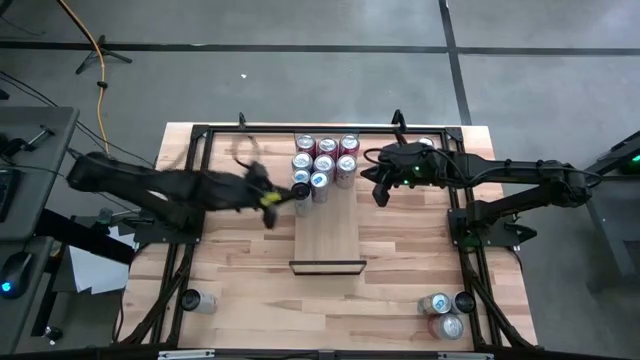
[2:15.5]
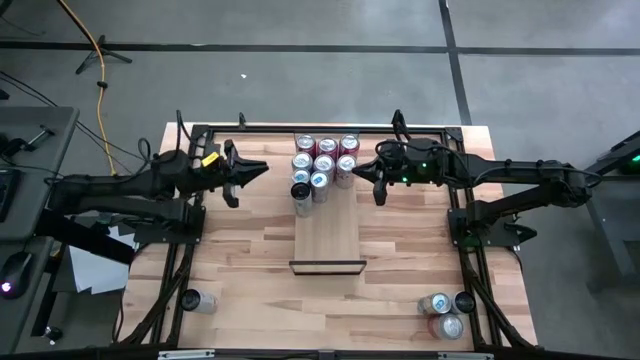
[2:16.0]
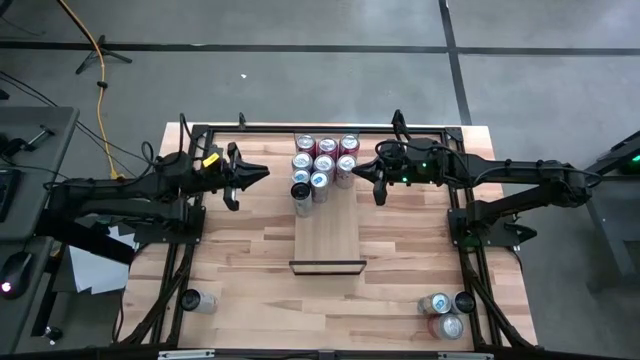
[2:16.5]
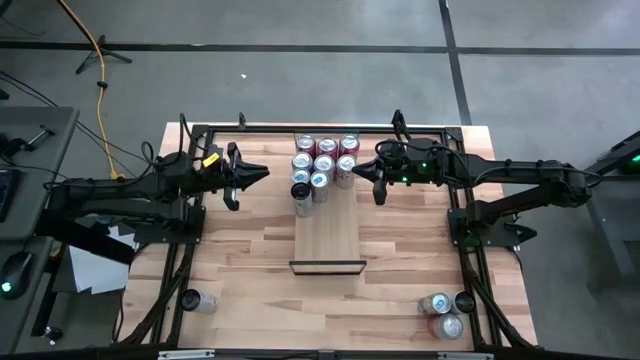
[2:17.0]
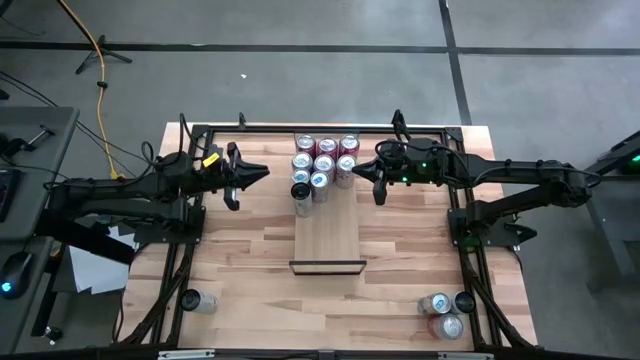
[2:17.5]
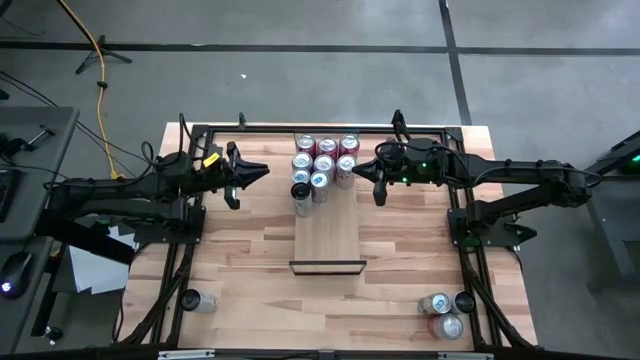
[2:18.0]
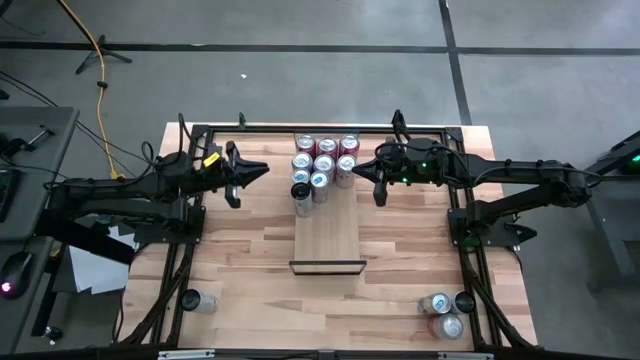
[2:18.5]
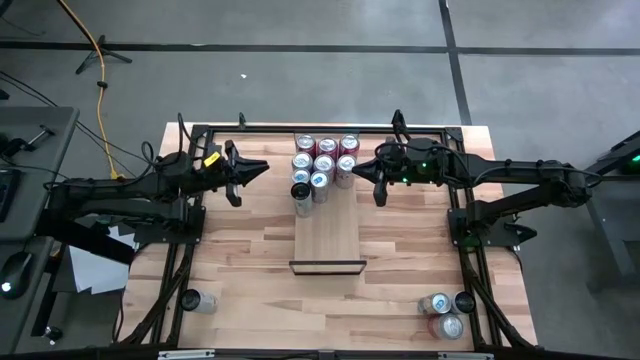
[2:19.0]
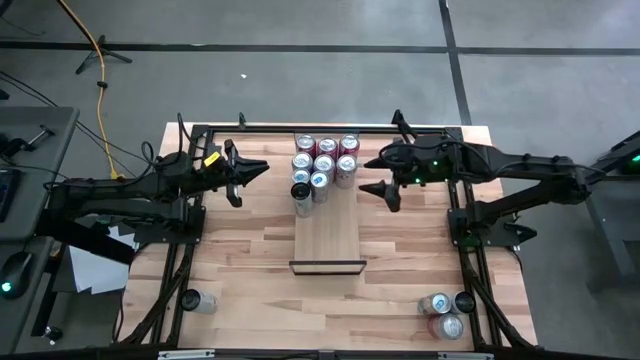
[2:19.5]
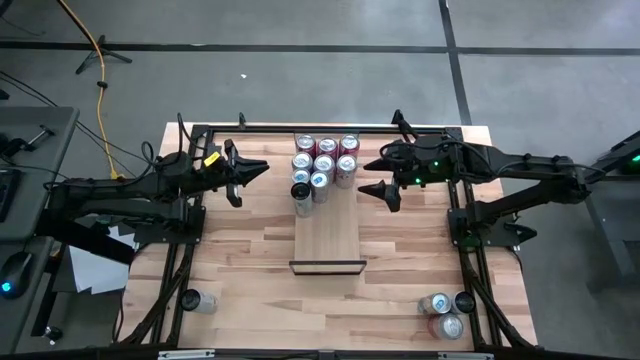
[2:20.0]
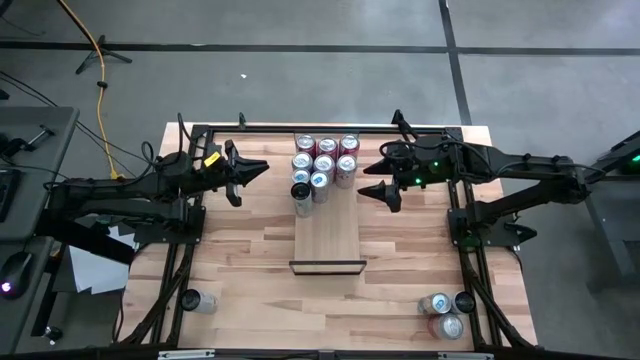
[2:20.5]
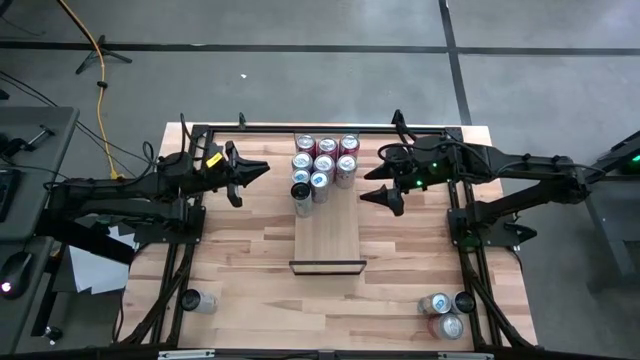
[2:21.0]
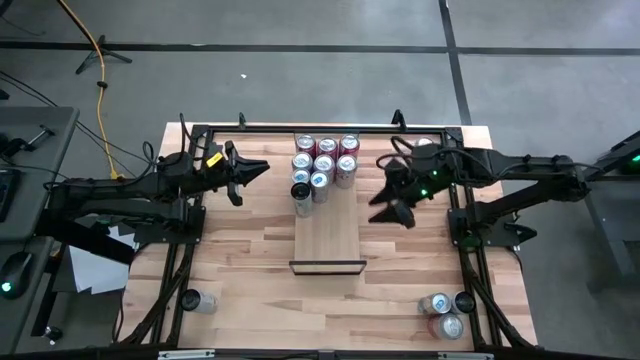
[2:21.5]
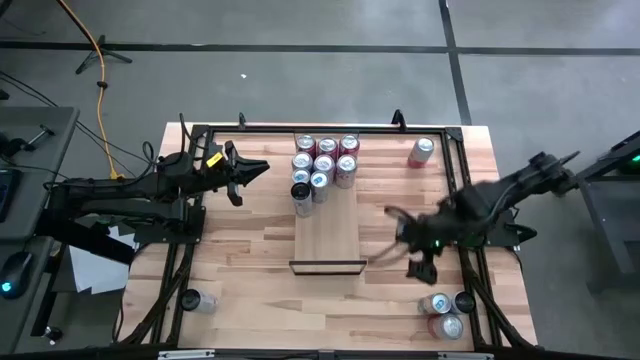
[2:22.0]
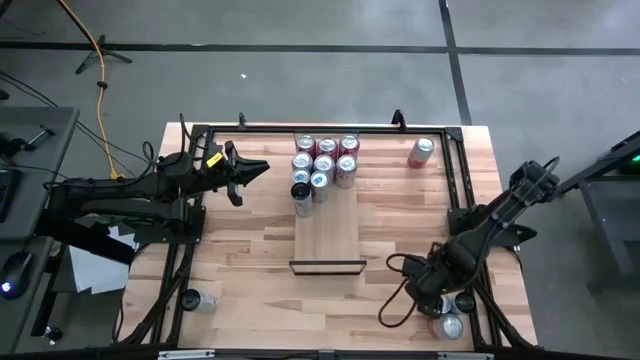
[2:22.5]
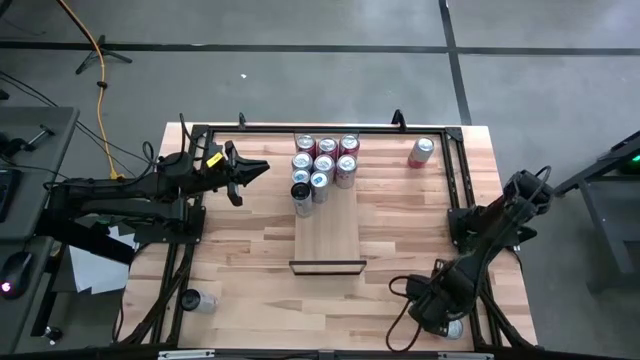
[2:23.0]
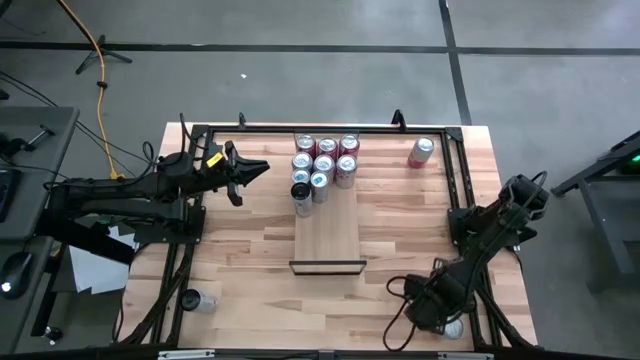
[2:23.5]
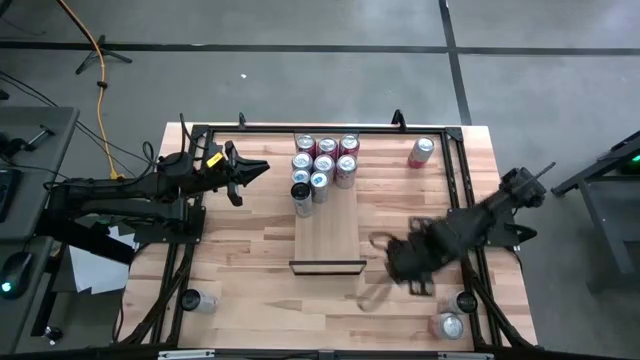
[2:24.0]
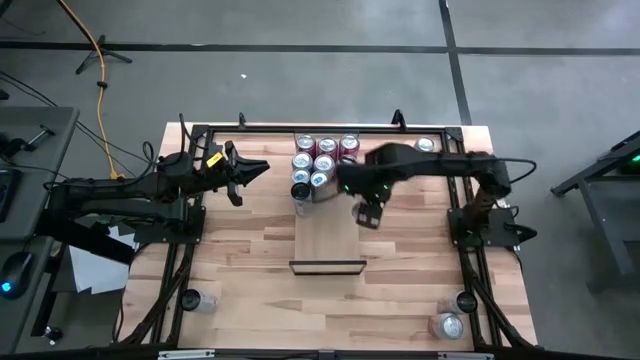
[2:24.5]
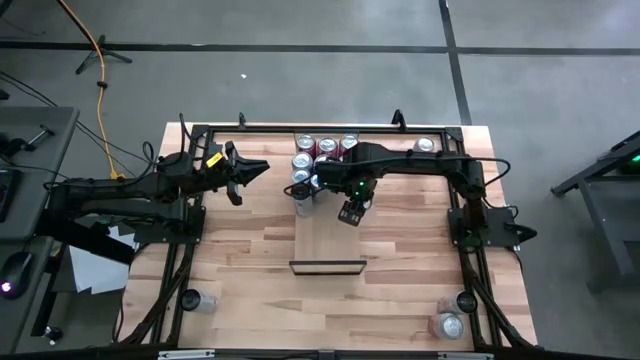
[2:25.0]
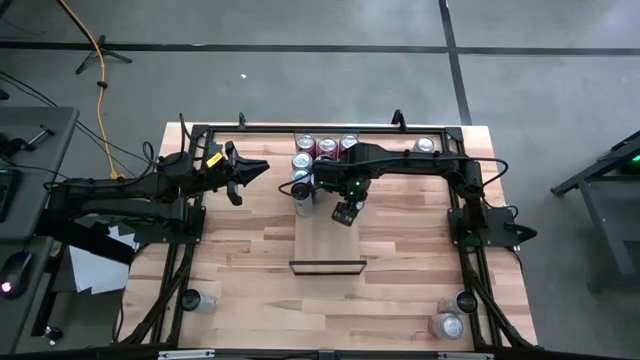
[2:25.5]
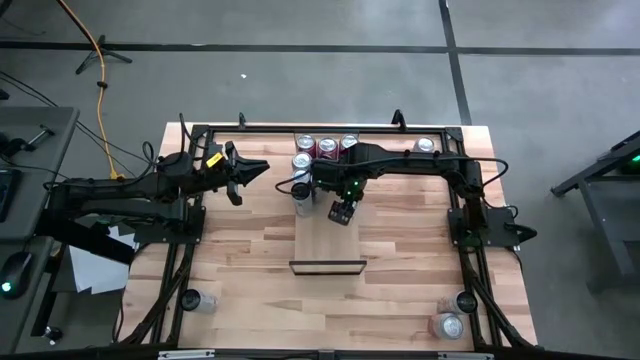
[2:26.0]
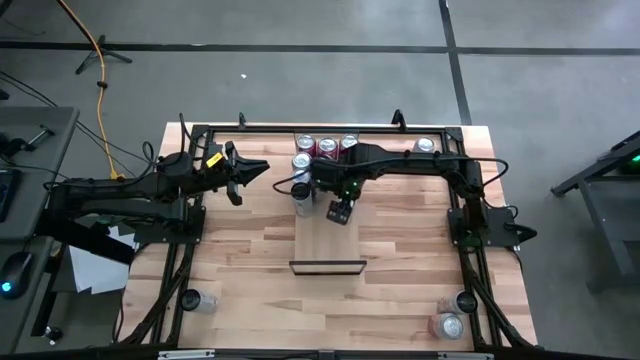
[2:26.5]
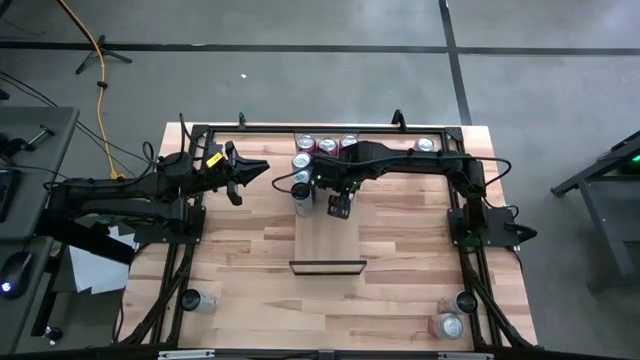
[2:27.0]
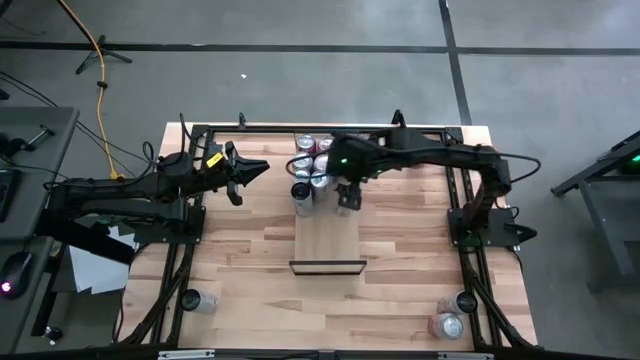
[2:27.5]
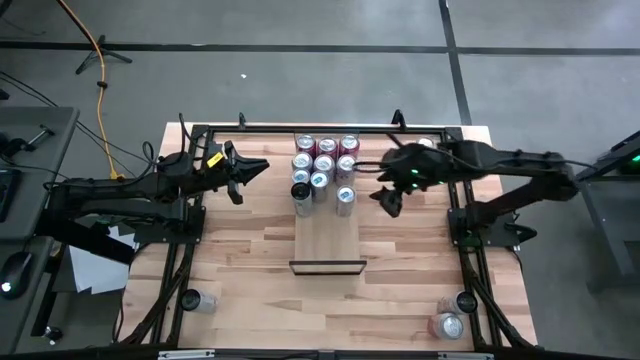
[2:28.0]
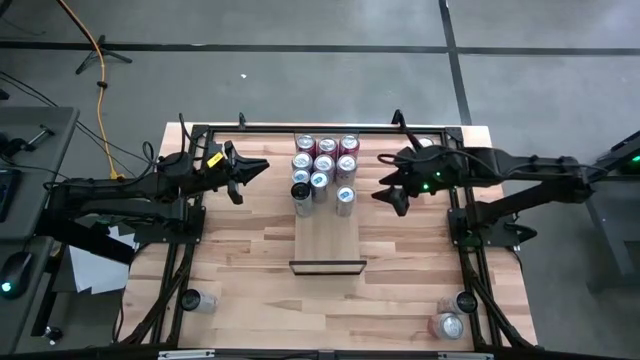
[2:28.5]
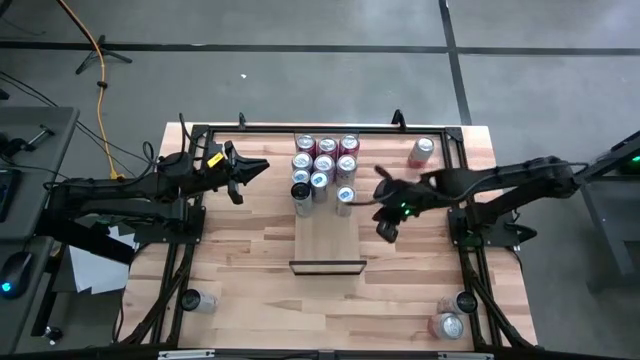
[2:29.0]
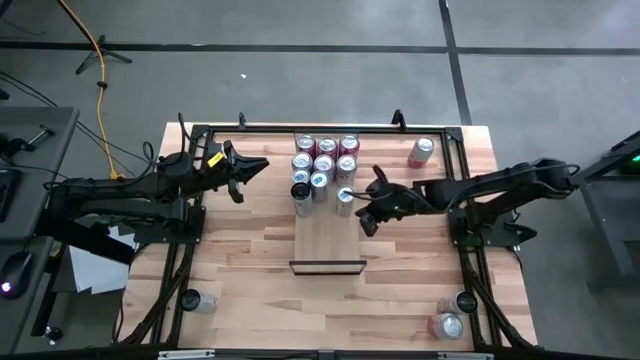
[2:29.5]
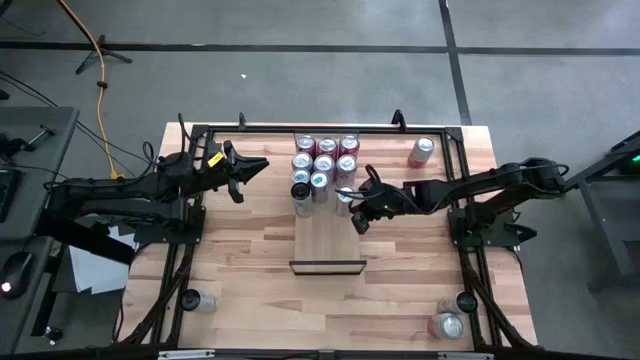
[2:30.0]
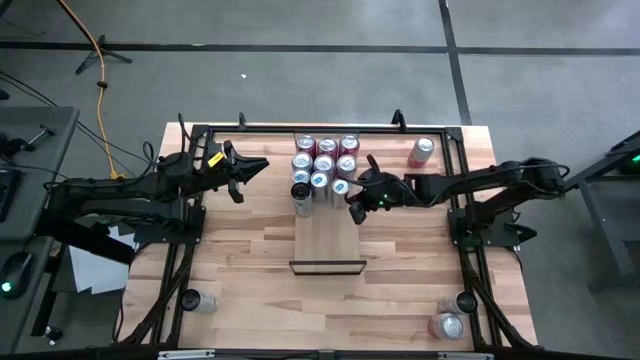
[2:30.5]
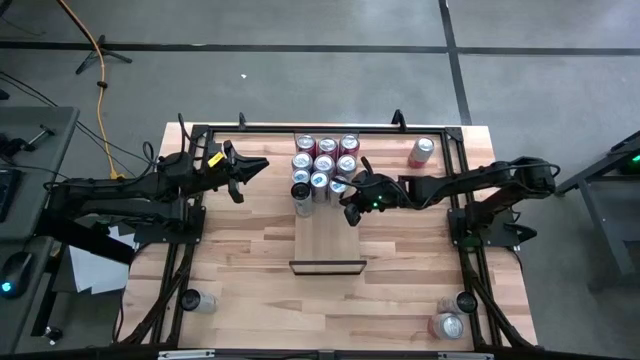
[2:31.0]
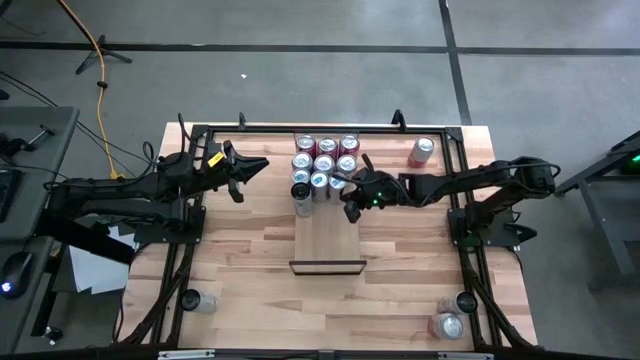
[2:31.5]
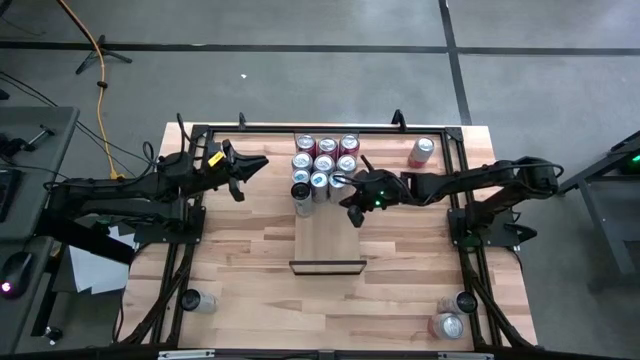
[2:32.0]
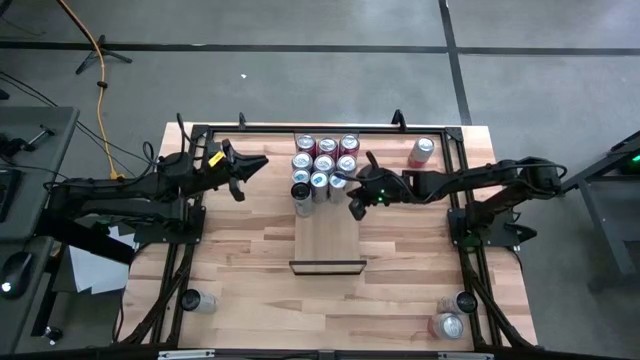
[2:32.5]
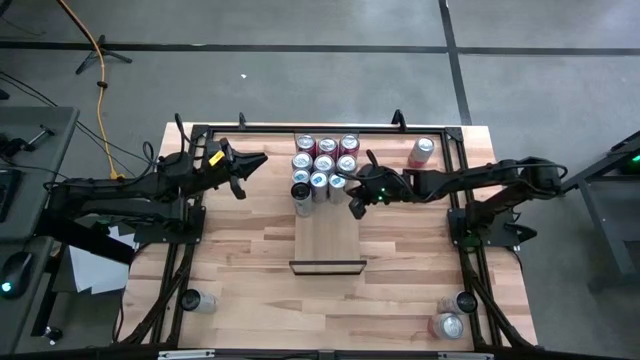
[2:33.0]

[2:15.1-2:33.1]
Task: Place canned beverage on shelf
Put the blue soda can on the shelf aligned with the other blue soda cans

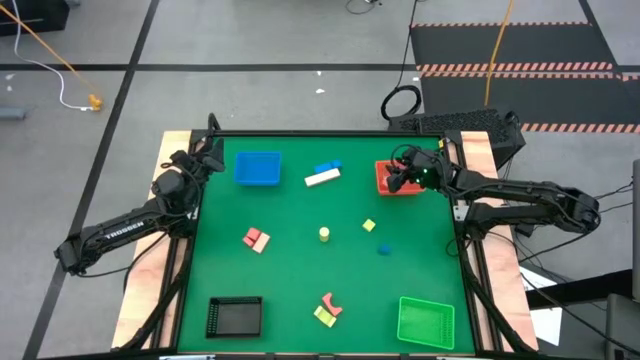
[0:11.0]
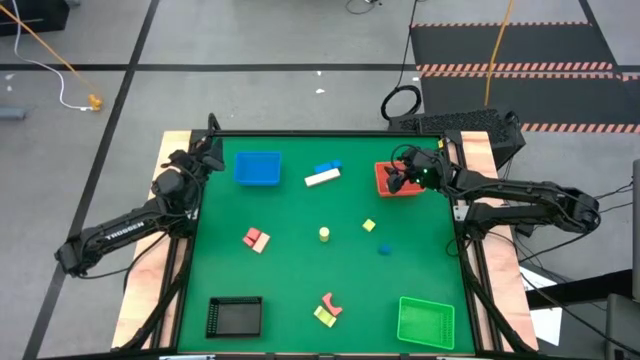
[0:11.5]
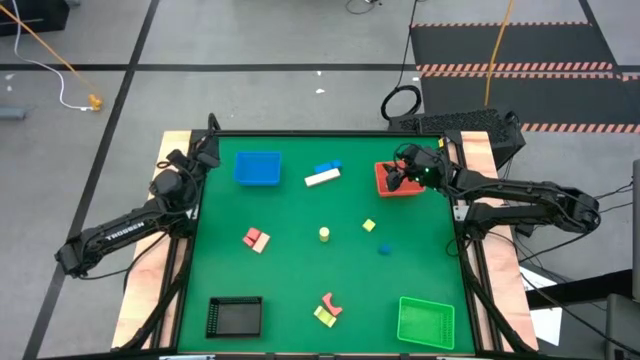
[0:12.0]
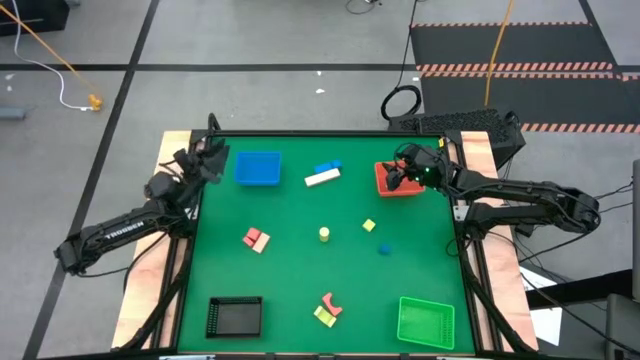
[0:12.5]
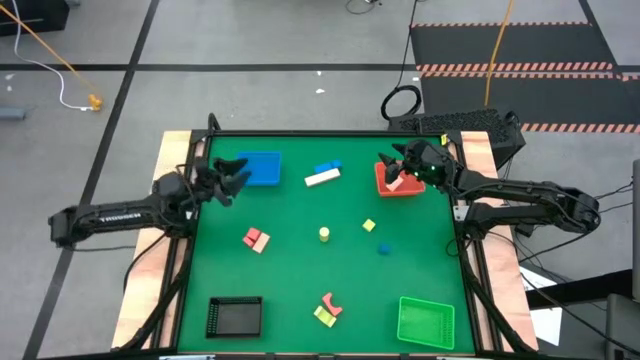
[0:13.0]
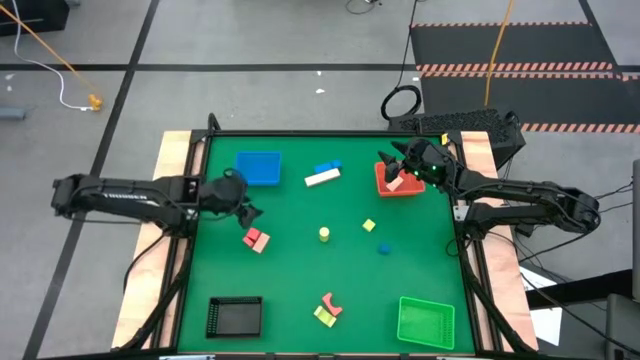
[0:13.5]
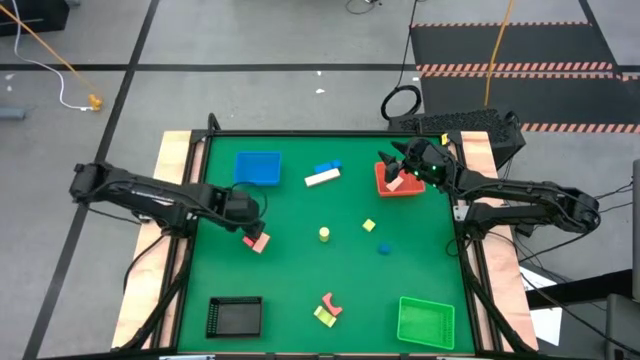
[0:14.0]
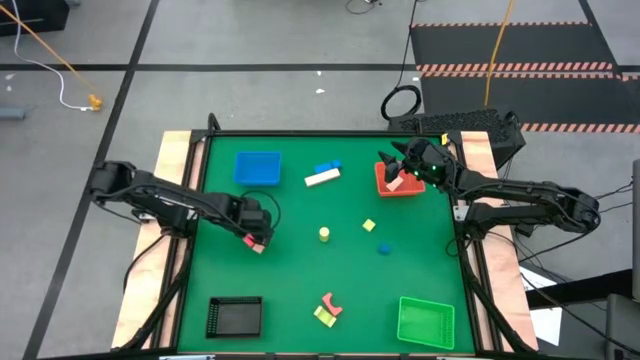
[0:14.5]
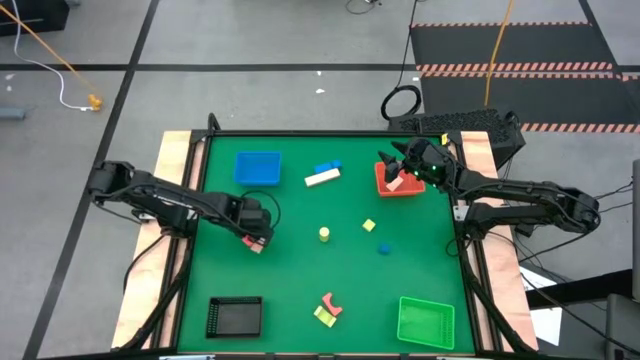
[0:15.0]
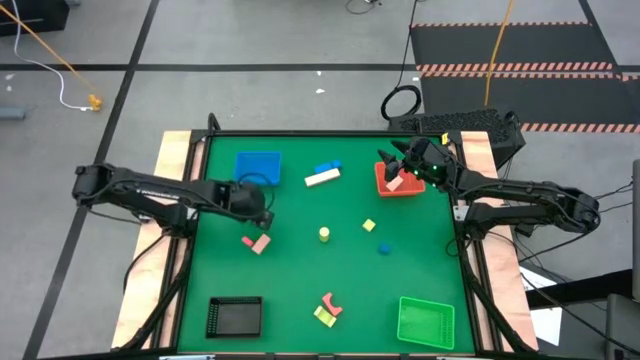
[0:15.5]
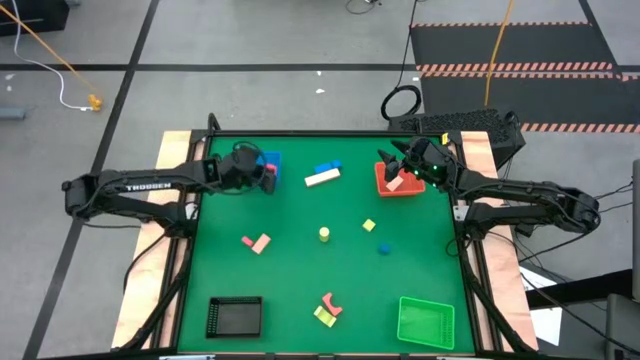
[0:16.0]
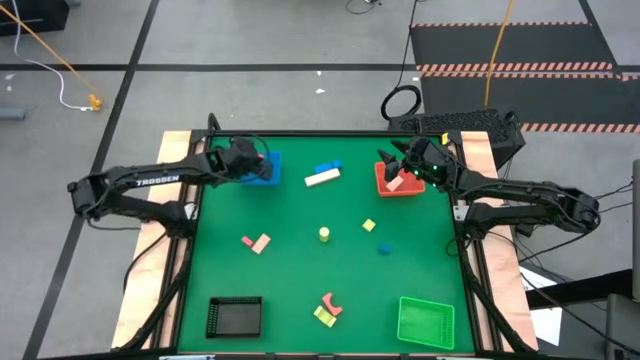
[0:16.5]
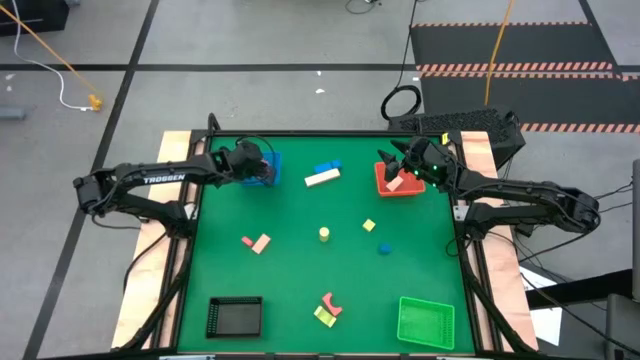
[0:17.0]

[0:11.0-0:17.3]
Task: Sort & place blocks by color
Put the top orange block in the blue basket
